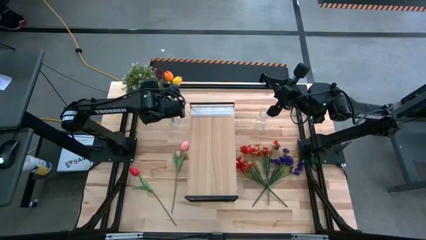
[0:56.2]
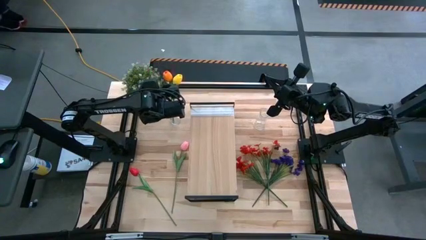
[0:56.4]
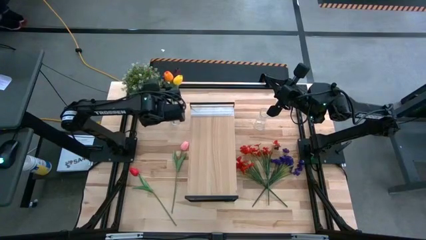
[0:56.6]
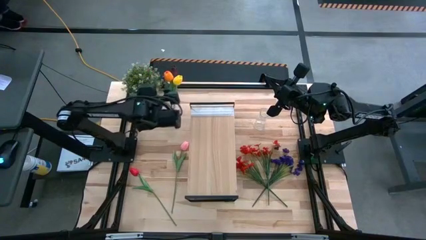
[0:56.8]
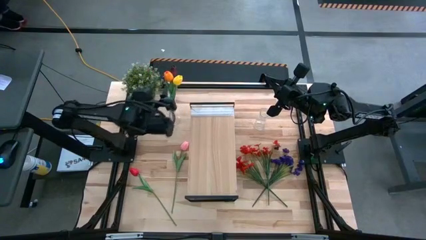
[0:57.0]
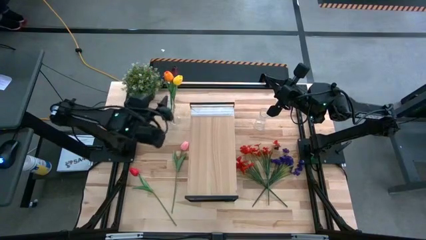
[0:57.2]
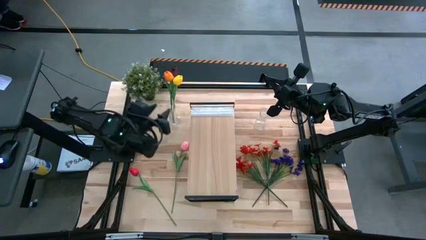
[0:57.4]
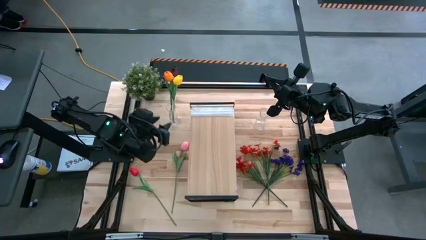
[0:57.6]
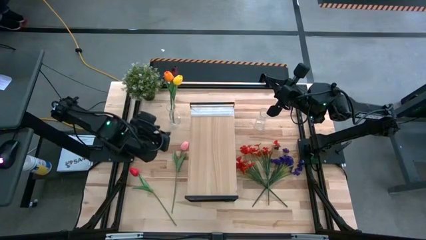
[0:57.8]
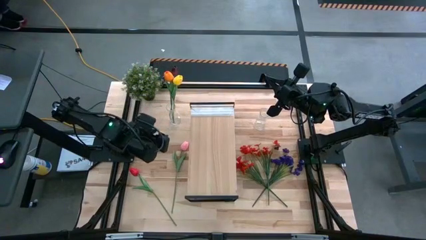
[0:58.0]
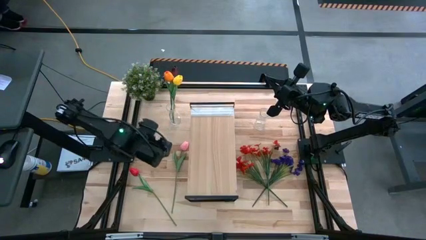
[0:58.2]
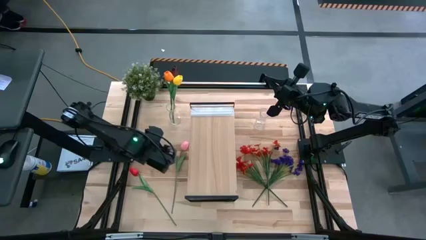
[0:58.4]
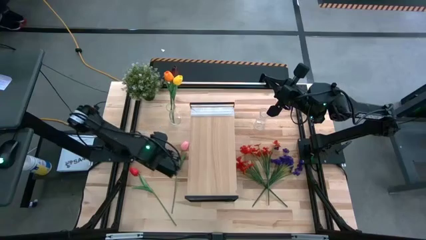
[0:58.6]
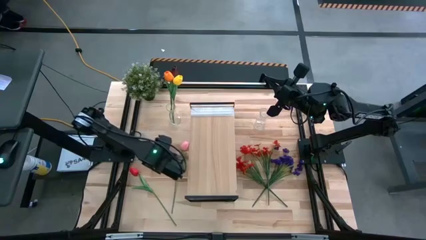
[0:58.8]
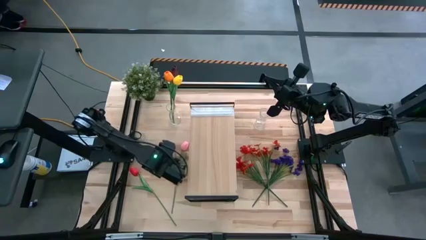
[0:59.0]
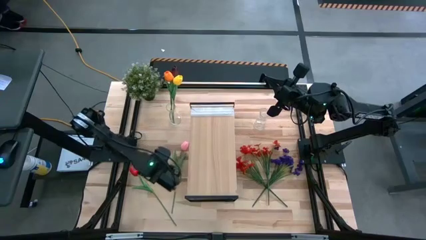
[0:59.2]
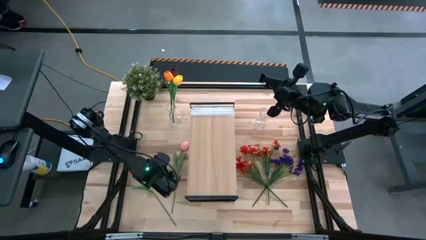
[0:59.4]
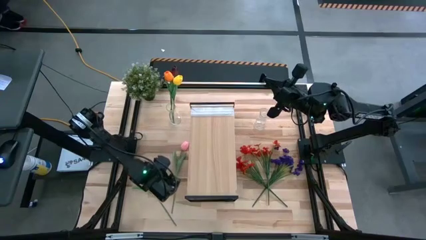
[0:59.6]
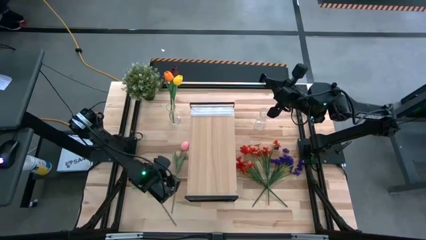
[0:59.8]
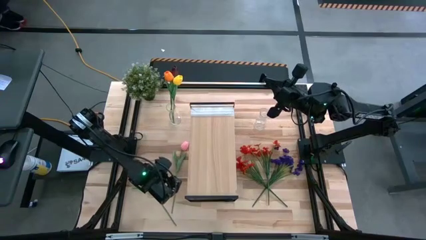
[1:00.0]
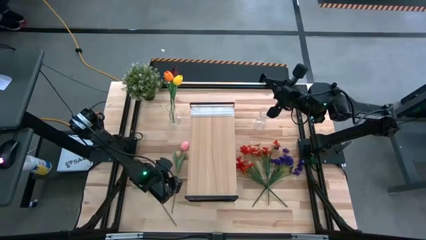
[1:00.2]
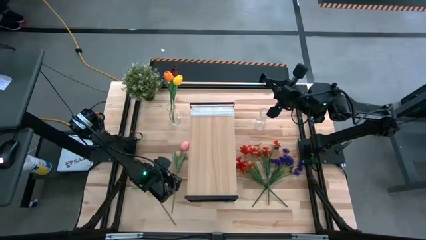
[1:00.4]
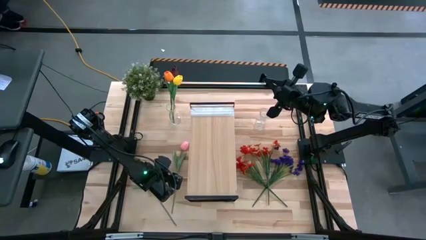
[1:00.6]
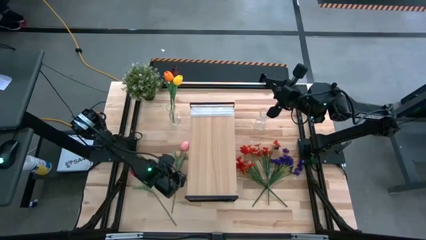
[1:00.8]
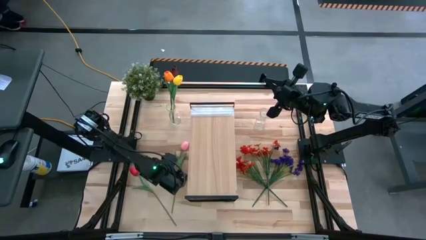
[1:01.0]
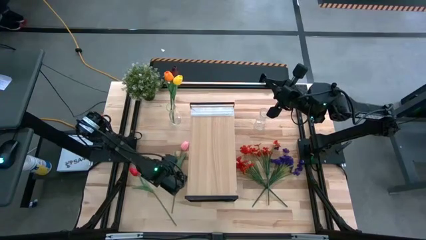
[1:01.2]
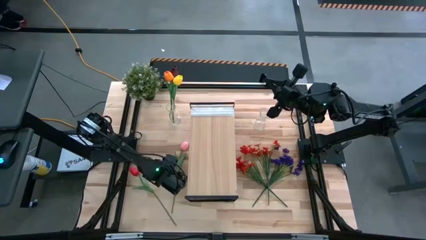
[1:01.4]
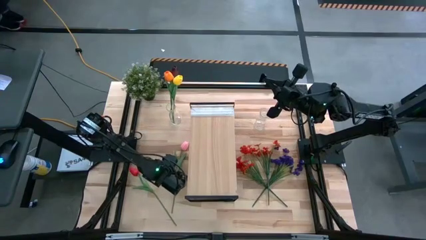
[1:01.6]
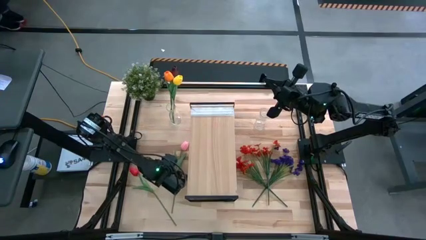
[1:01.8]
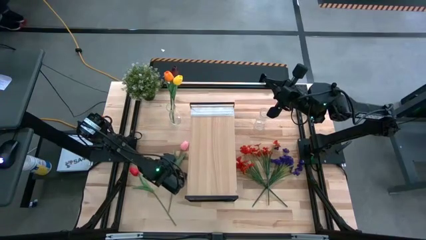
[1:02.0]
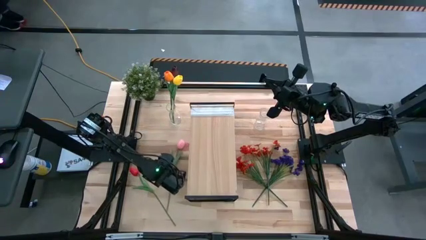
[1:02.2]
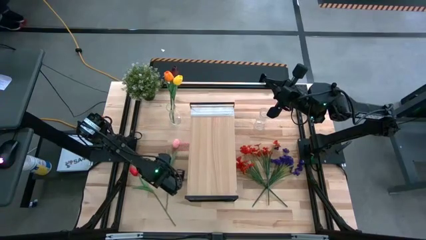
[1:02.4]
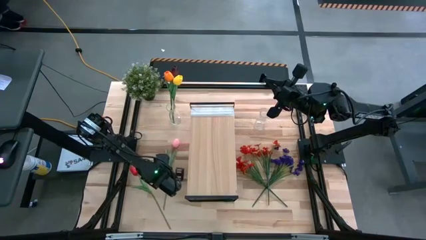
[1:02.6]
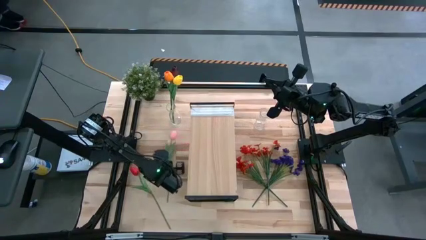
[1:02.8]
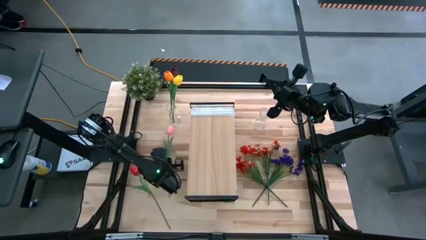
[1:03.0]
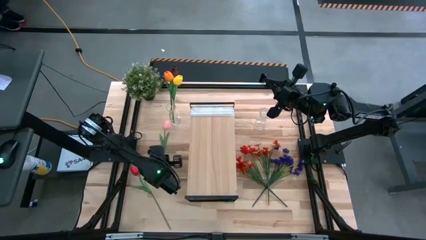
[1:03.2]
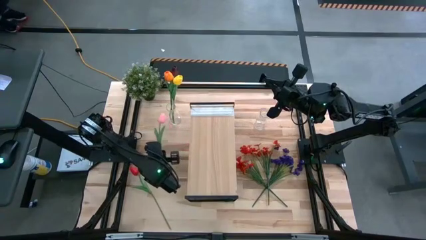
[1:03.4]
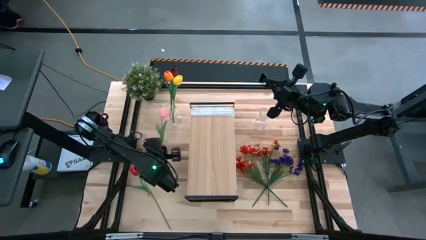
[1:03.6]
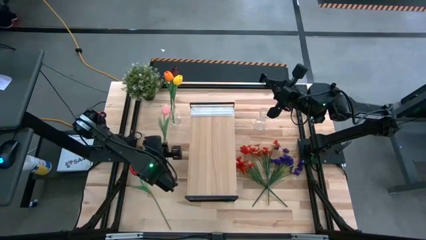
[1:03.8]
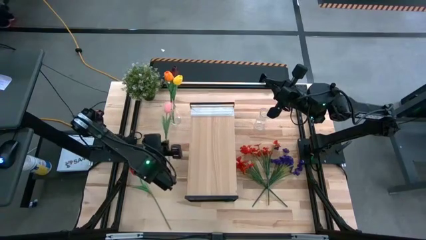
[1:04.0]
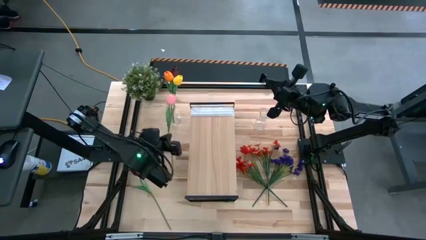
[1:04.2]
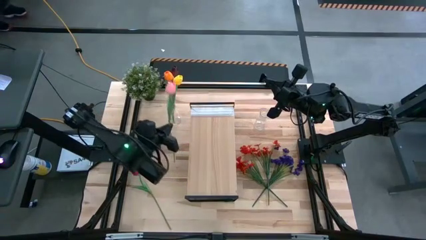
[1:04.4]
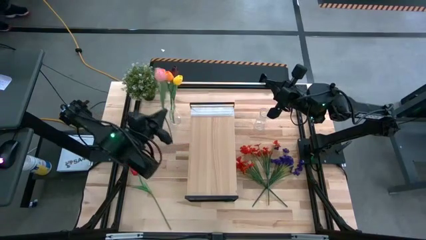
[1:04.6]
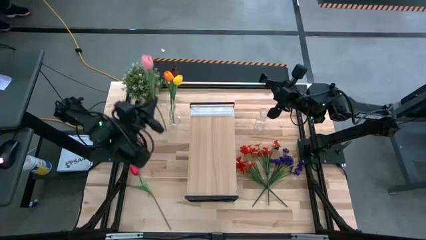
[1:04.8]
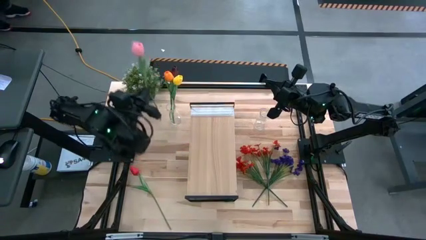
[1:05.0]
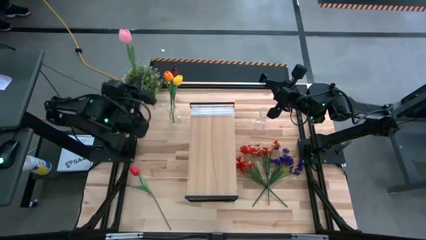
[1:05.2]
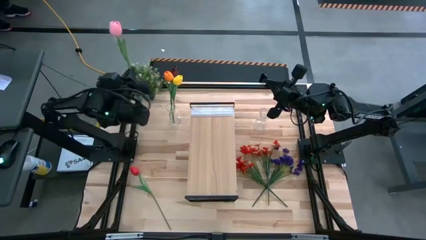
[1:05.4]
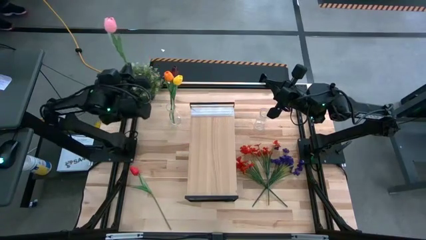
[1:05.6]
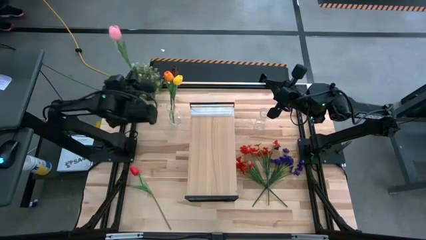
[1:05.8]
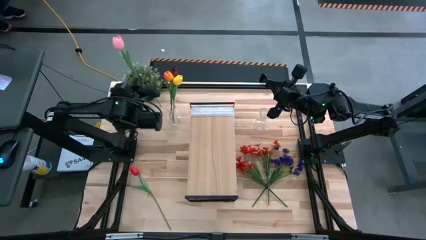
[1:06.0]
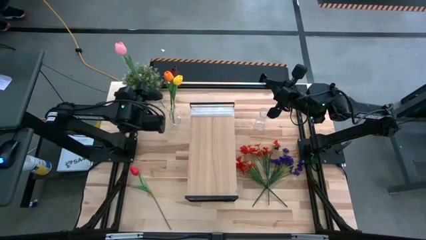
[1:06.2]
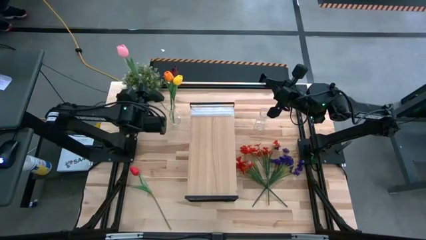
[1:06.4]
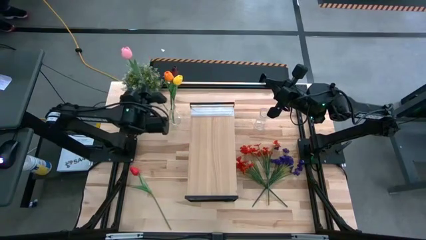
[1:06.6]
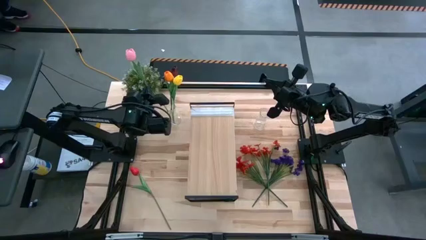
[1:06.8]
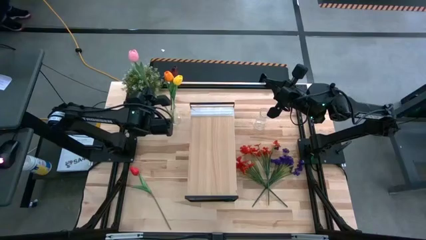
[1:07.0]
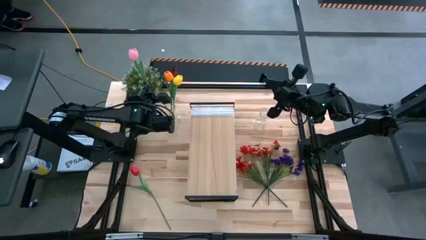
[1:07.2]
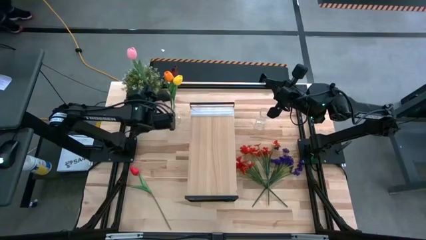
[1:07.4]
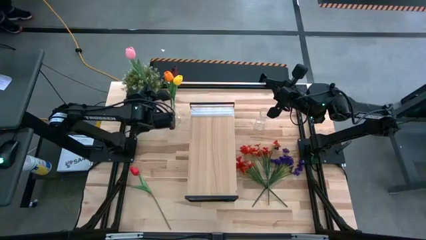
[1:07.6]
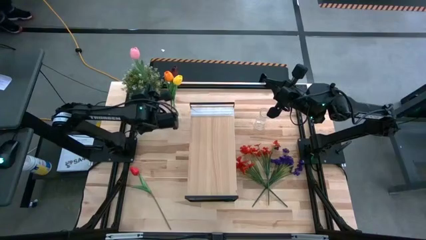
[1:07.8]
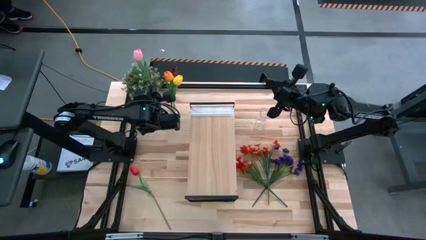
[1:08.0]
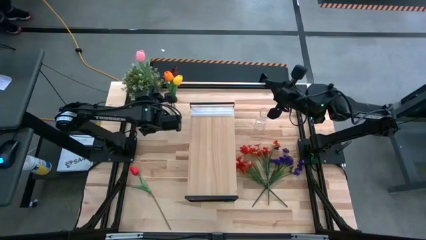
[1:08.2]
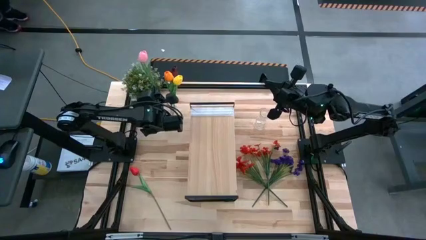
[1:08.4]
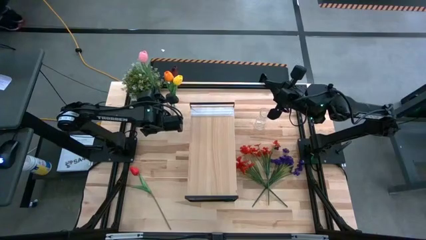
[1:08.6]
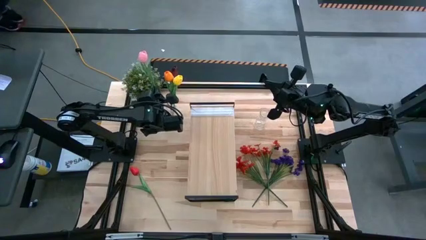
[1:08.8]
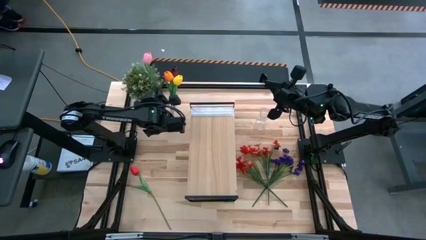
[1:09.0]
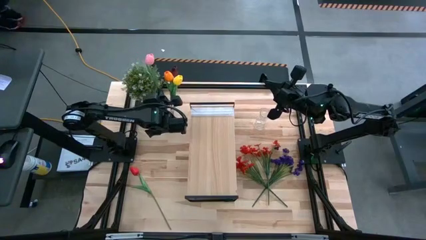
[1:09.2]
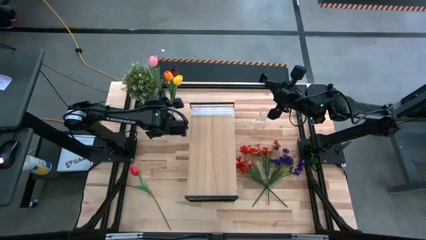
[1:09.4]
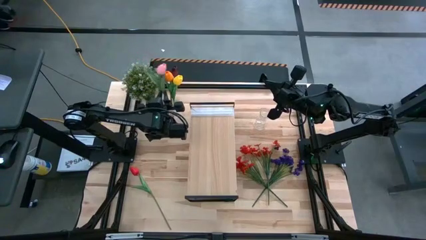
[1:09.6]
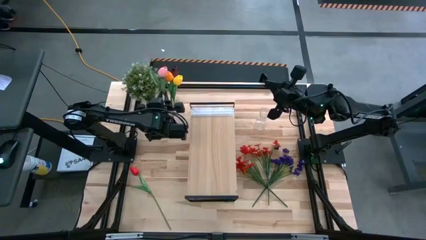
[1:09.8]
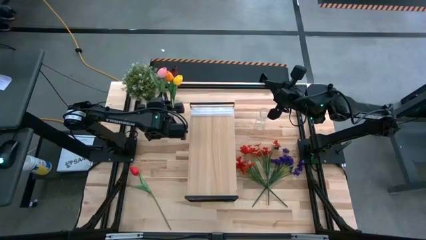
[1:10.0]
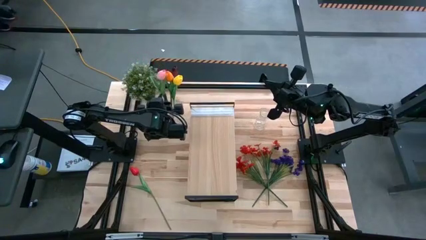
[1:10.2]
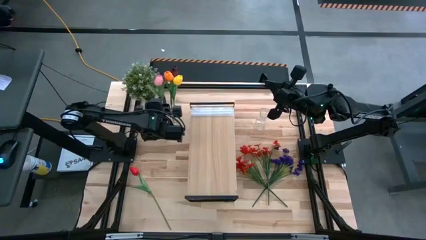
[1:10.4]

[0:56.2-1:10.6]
Task: Pick and place flowers into a vace then onto a shelf
Put the pink tulip into the left transparent vase

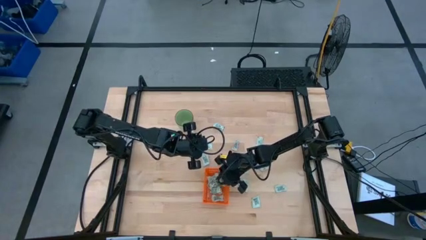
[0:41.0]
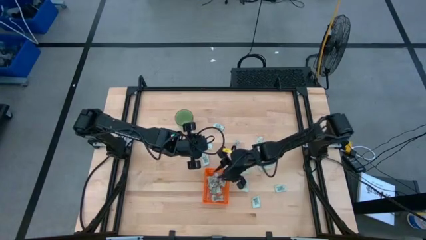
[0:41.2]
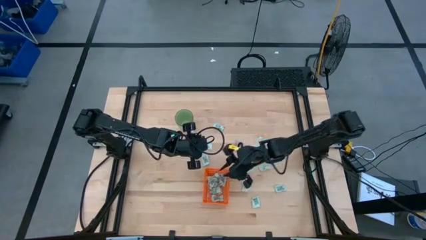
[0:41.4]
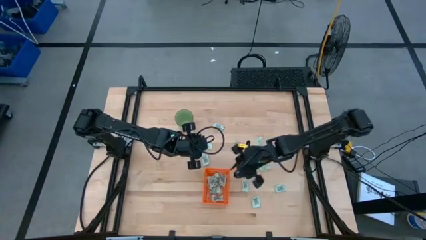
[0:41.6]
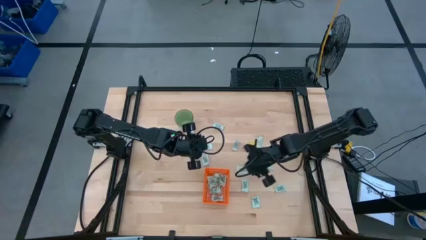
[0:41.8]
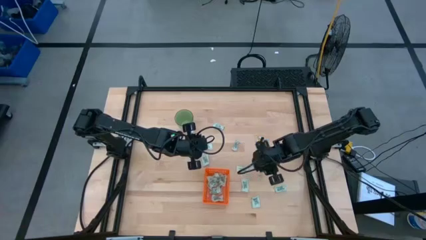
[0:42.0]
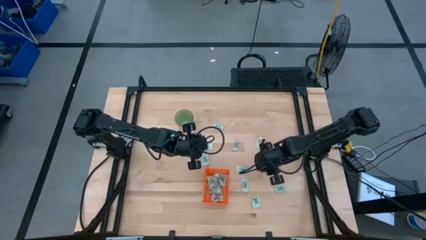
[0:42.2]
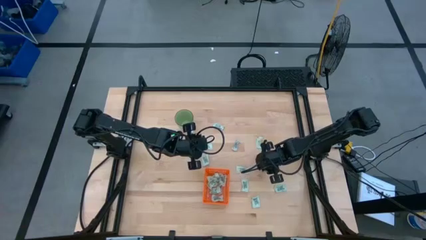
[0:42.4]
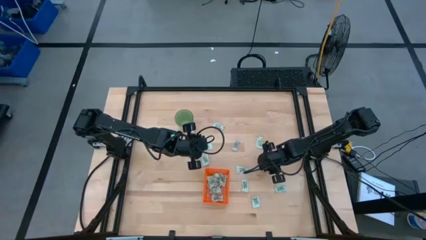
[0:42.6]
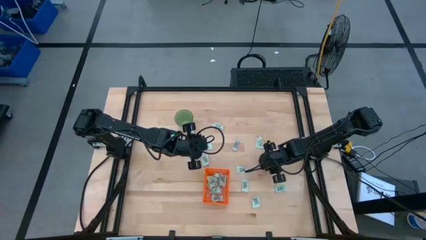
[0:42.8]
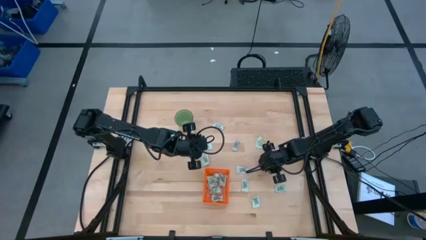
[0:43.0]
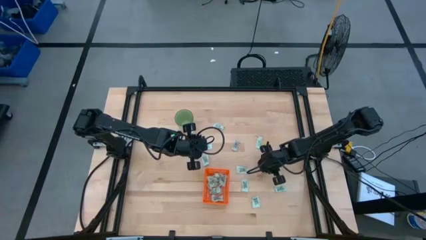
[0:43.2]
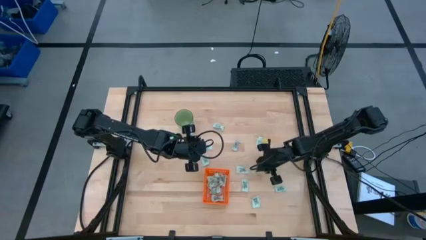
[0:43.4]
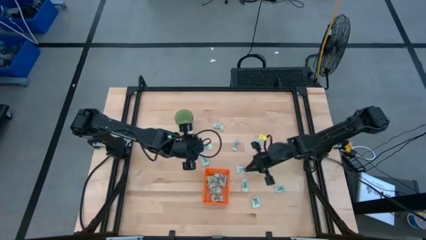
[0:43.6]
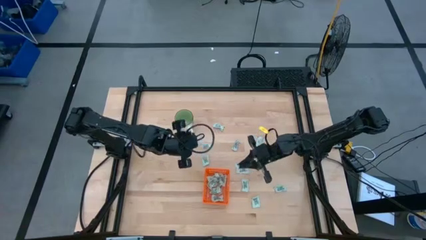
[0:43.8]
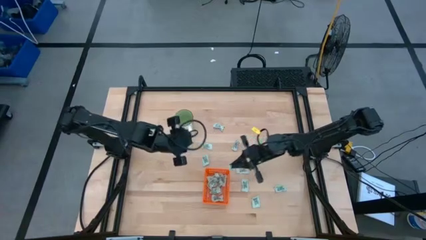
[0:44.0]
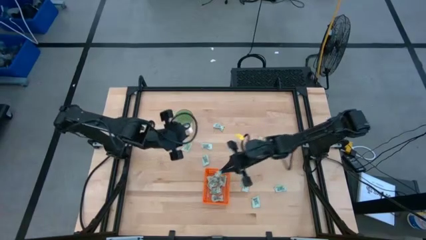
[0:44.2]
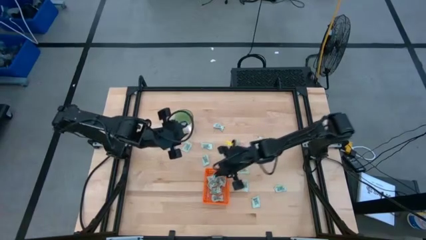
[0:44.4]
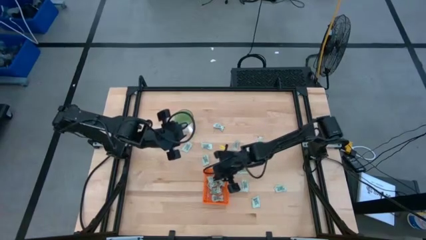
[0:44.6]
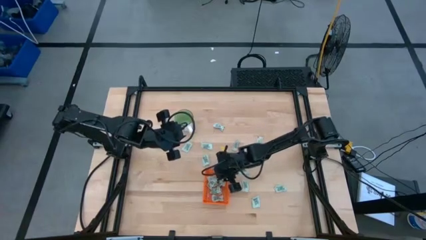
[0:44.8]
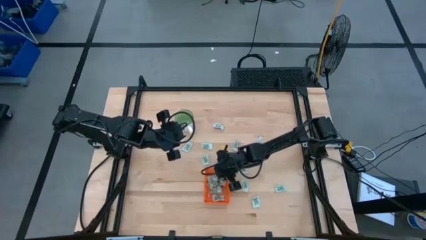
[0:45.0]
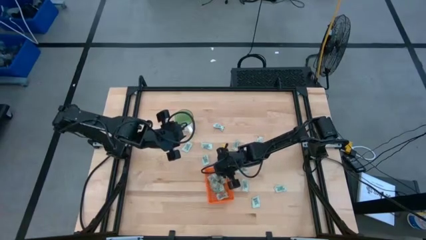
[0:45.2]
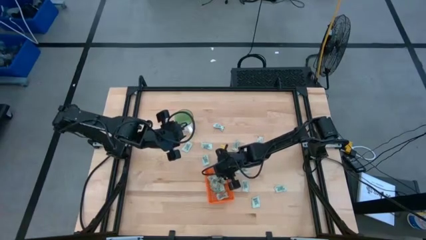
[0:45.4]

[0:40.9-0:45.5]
Task: Pick and place Stevia / Truvia into bins
Put the stevia packet into the orange basket
